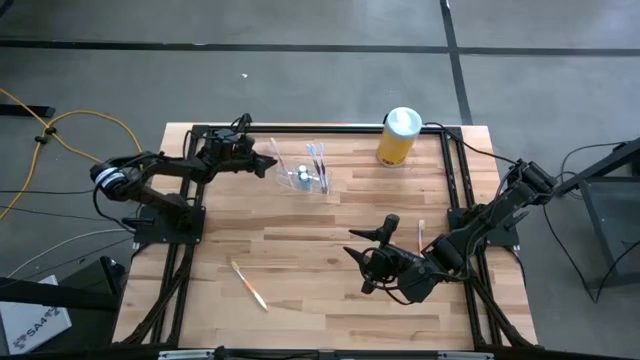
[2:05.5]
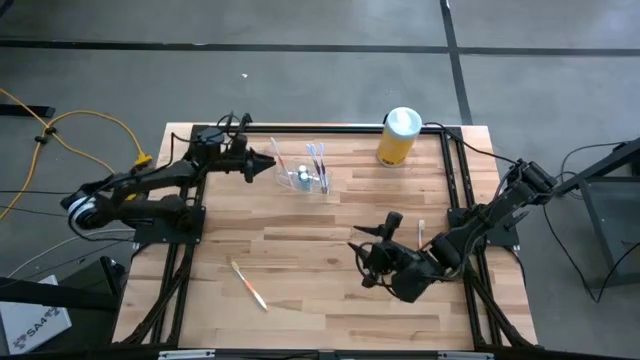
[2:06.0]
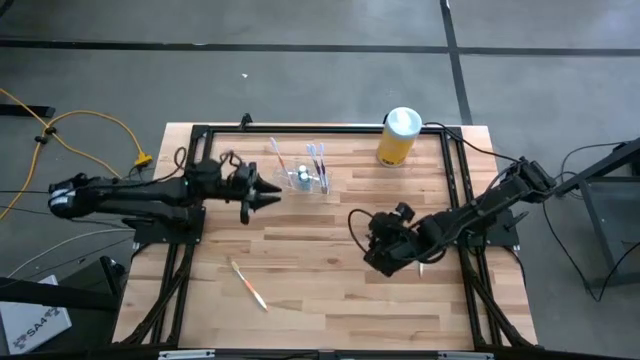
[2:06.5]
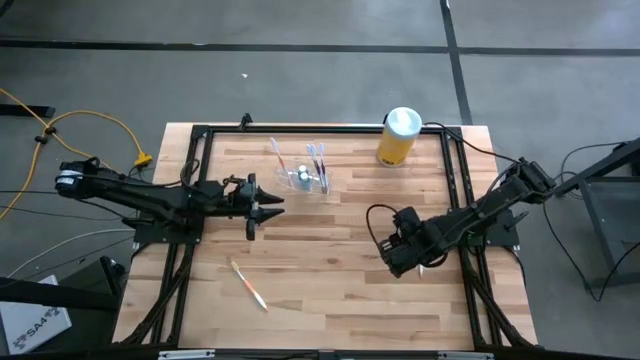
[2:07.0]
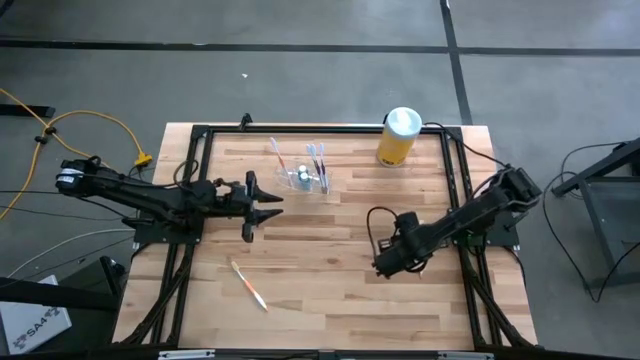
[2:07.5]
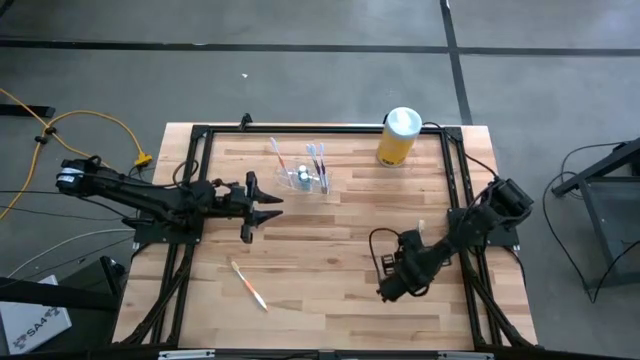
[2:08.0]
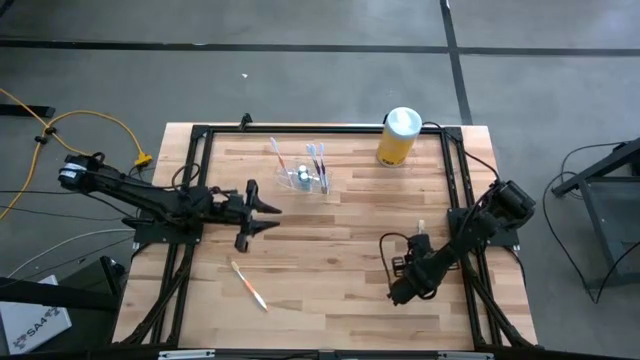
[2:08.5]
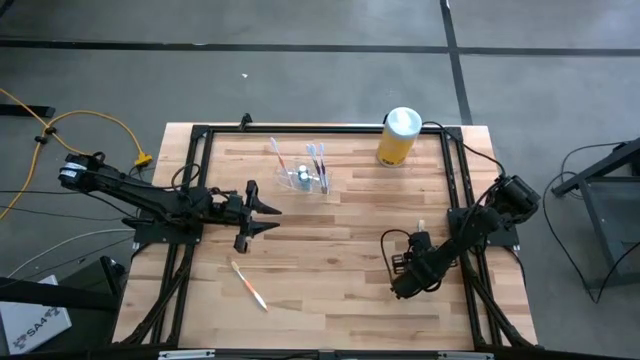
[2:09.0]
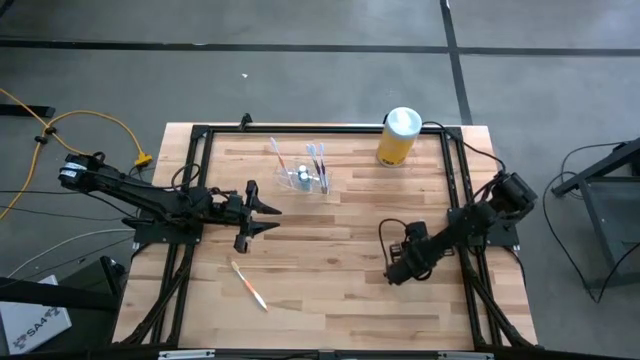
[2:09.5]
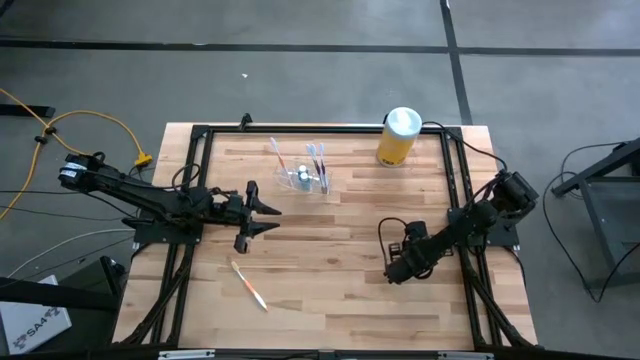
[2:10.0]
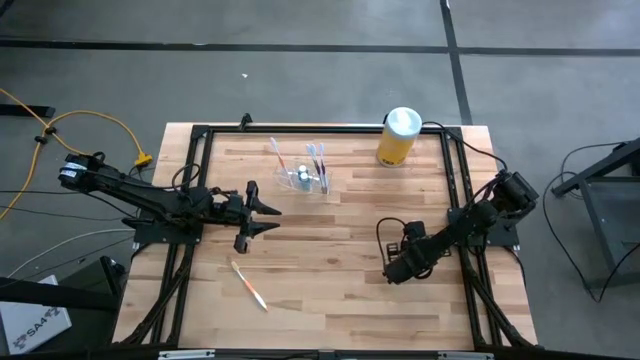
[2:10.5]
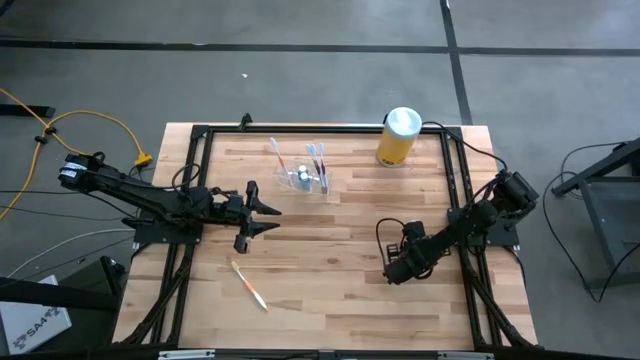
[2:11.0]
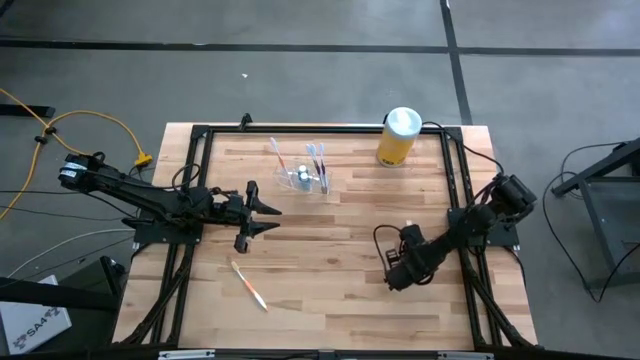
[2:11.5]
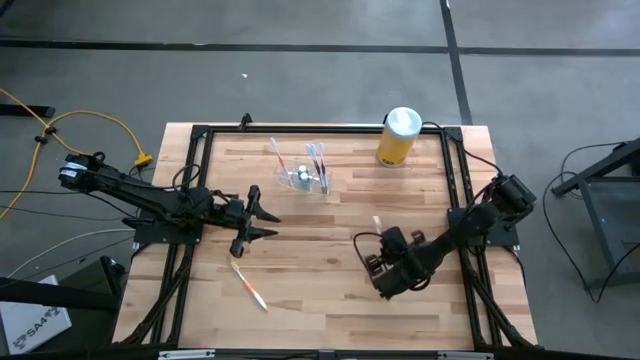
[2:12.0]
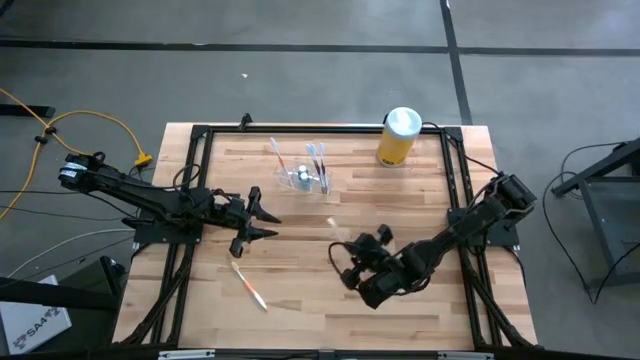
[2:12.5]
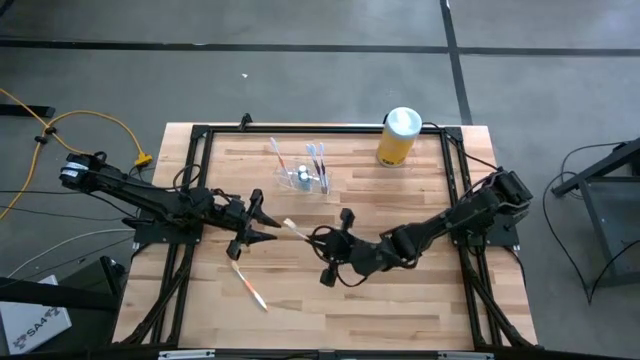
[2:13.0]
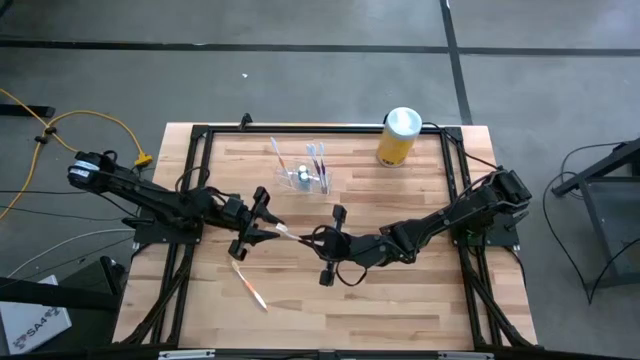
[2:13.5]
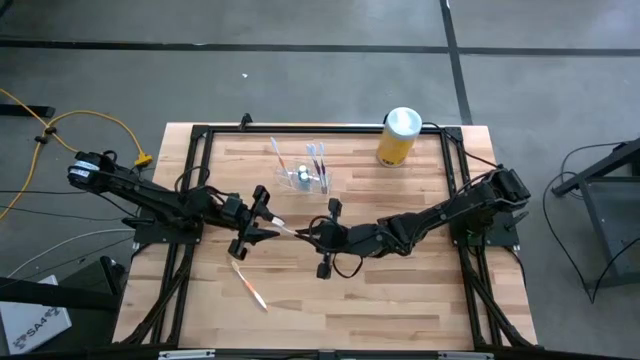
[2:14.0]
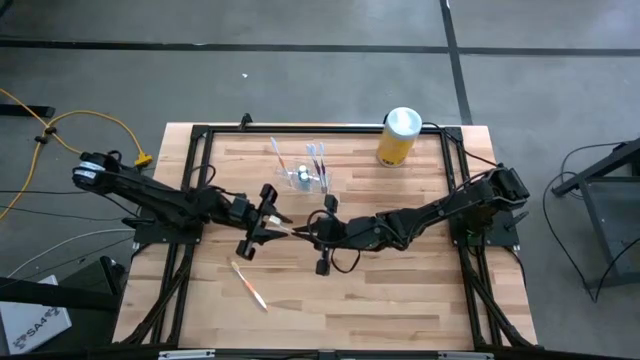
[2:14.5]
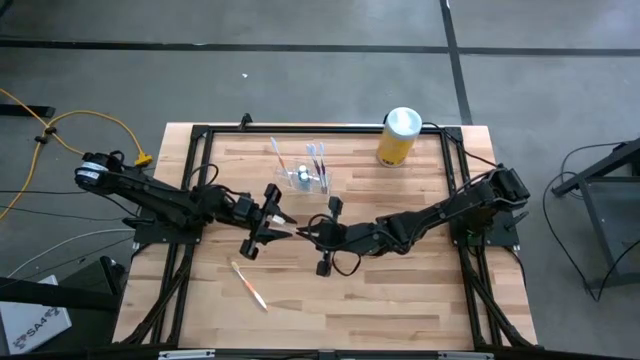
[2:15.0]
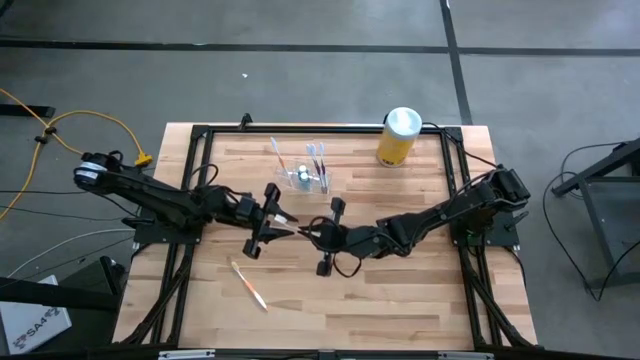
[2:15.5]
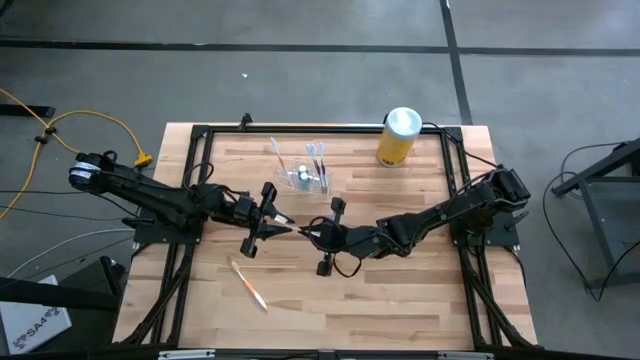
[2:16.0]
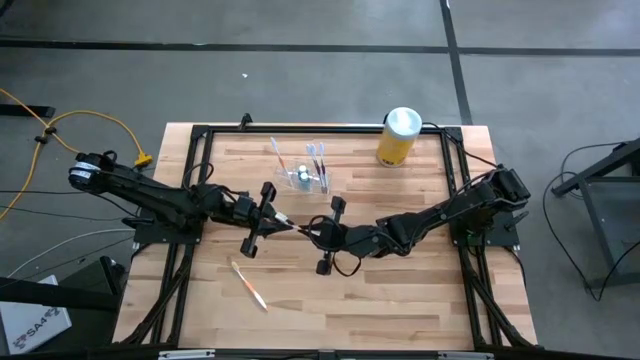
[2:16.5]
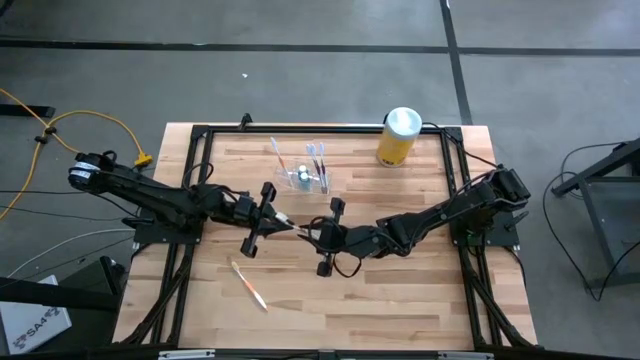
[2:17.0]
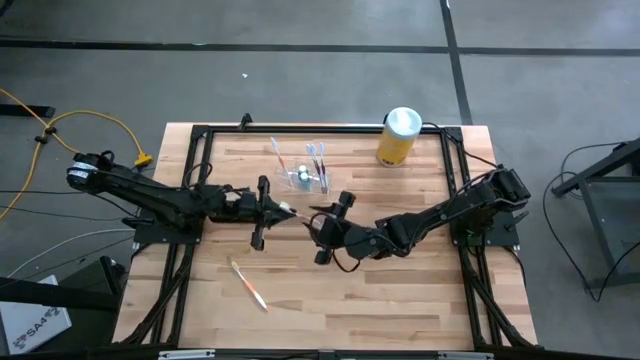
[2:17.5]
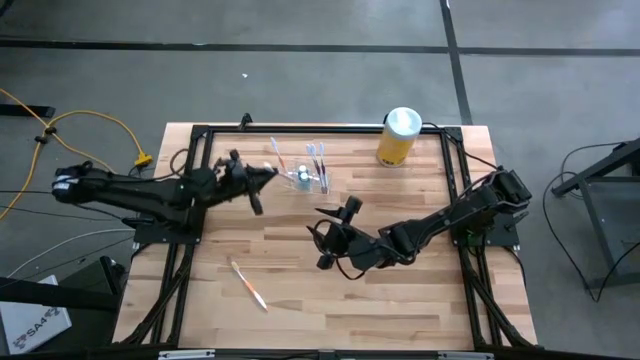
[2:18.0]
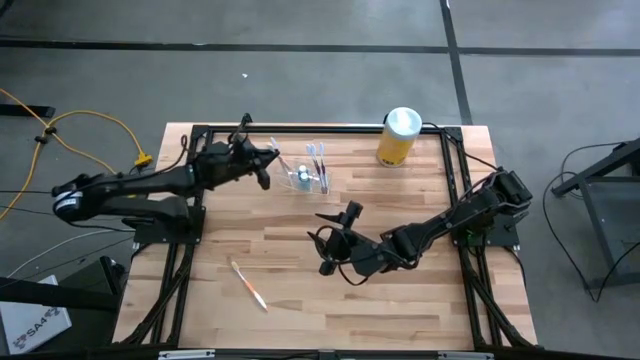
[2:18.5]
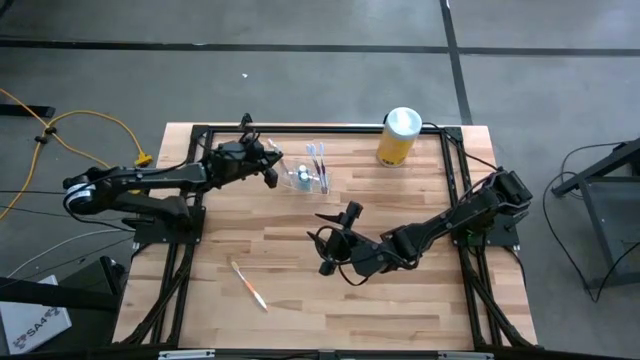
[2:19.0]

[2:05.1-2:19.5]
Task: Pick & Place toothbrushing station
Put the right orange toothbrush into transparent organizer

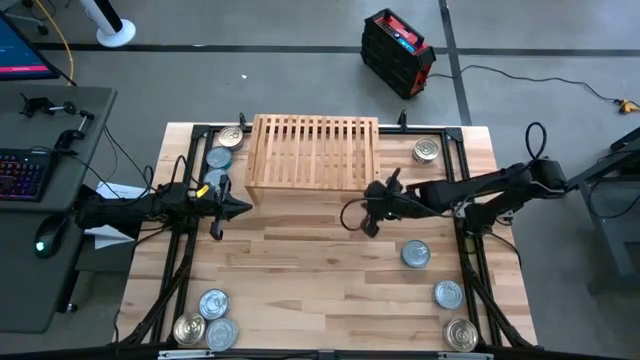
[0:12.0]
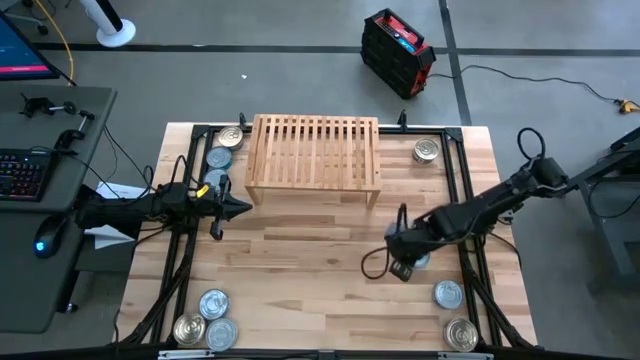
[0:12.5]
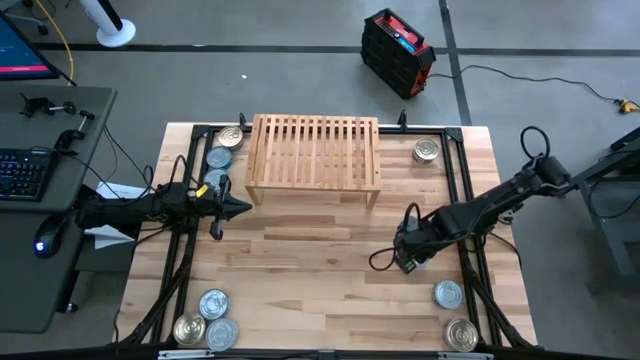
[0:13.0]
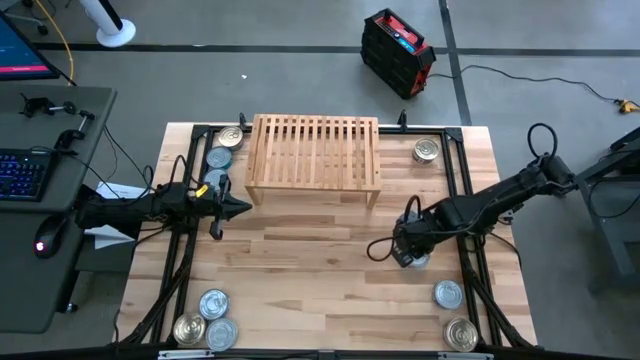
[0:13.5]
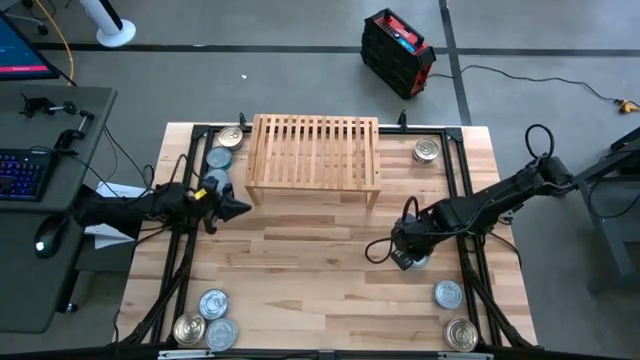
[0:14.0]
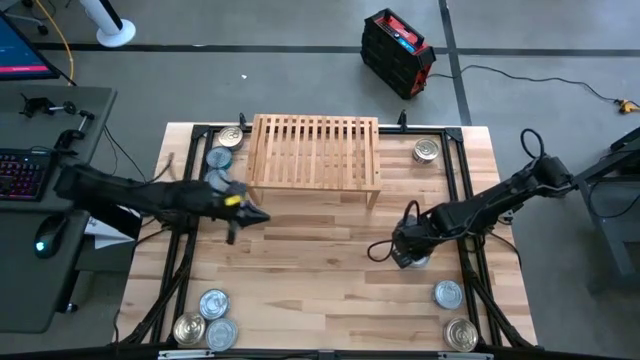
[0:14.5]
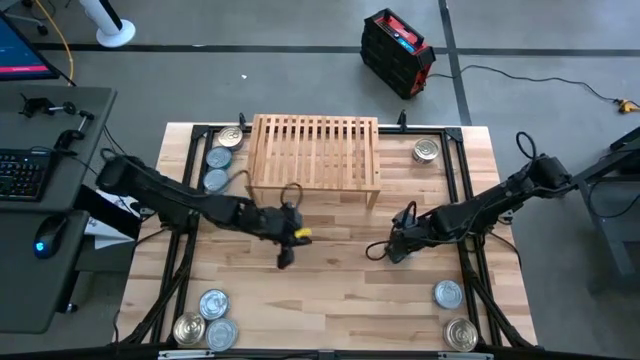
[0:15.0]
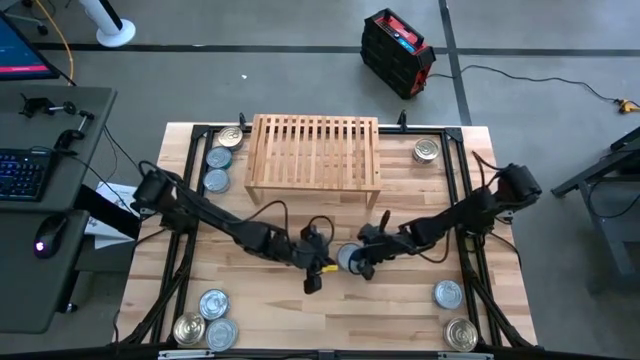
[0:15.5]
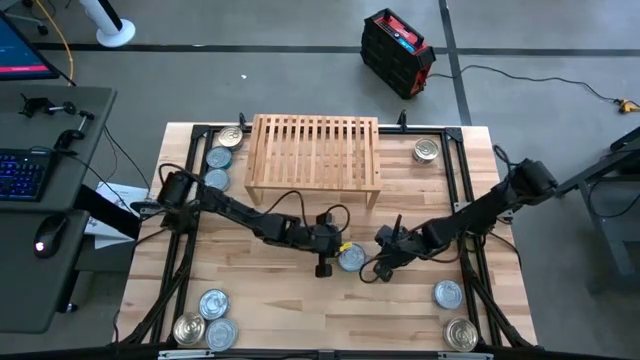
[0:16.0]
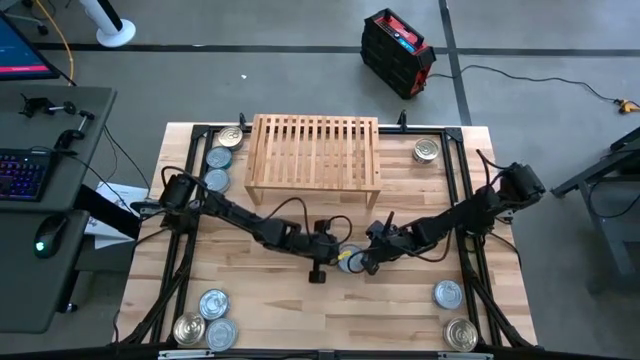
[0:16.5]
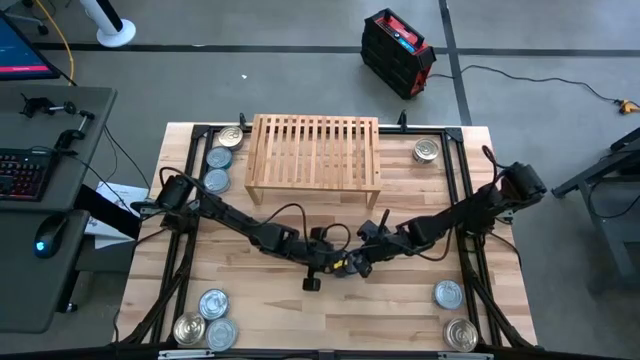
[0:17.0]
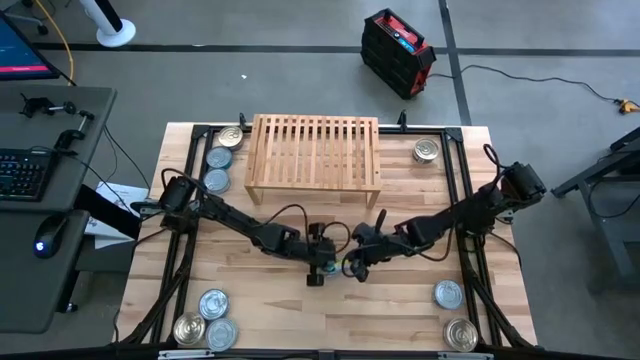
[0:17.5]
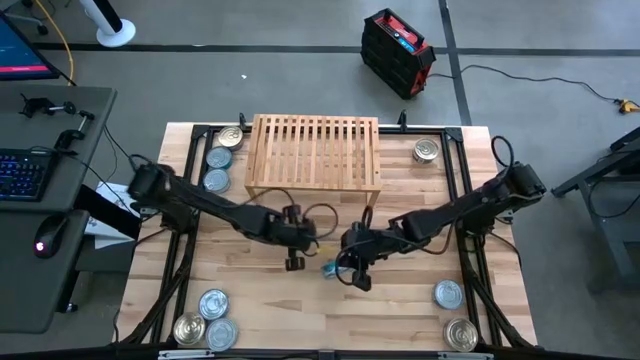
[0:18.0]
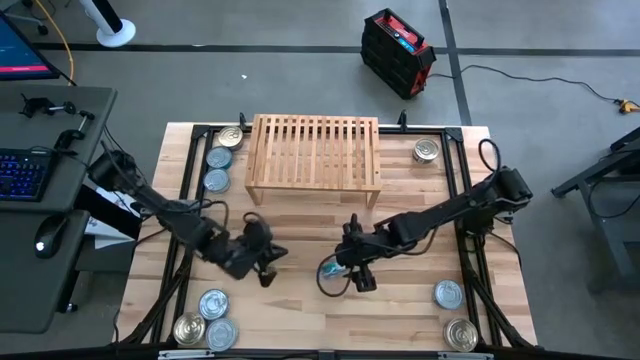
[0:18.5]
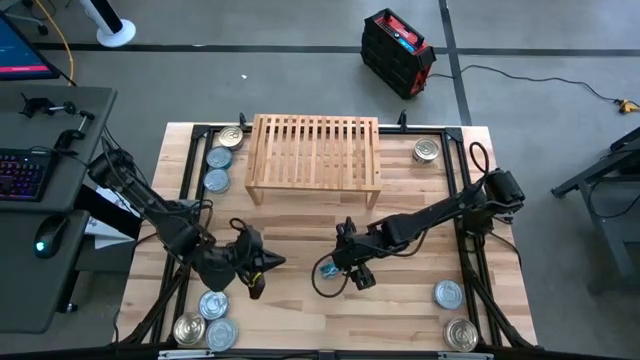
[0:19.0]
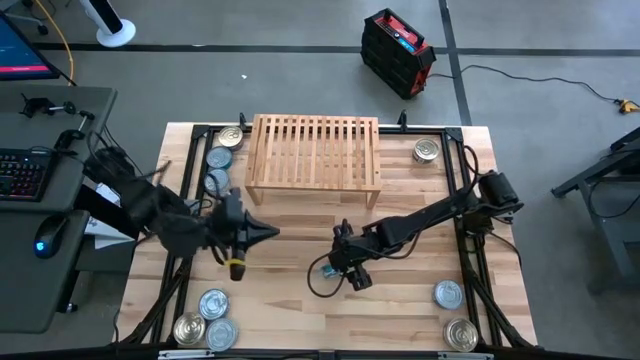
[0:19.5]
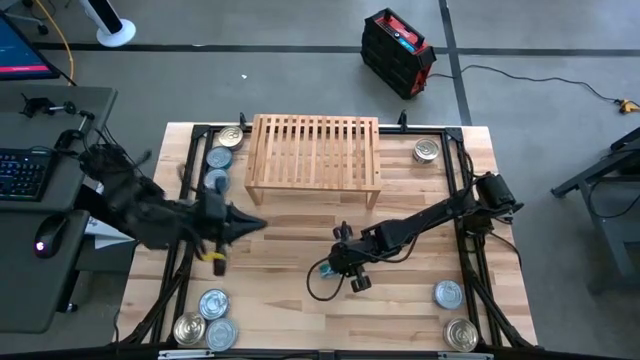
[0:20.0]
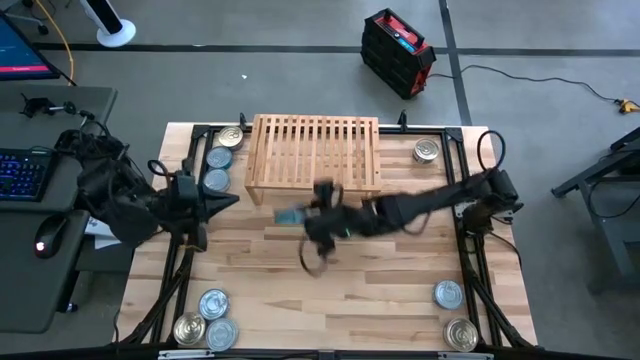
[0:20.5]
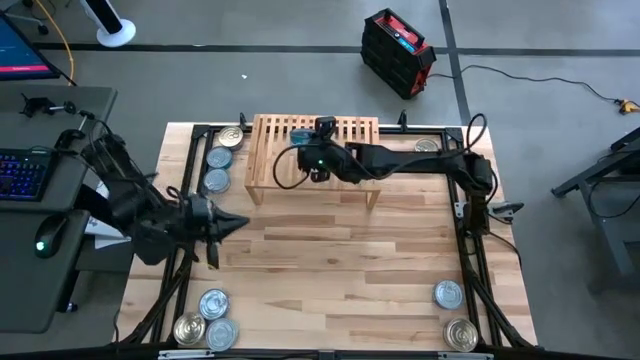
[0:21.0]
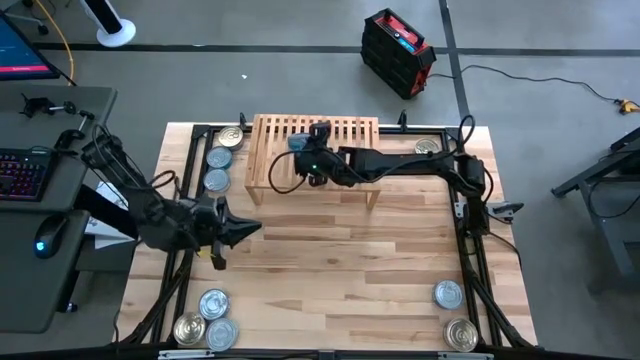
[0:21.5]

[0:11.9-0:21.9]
Task: Stack canned seafood by type on shelf
Put the green tuna can on the shelf
